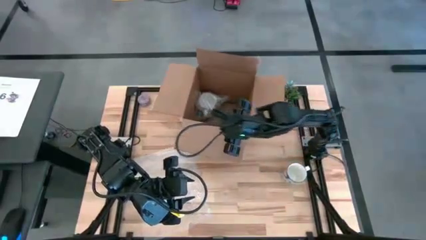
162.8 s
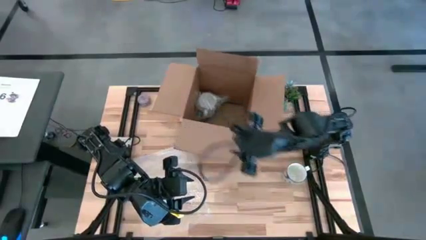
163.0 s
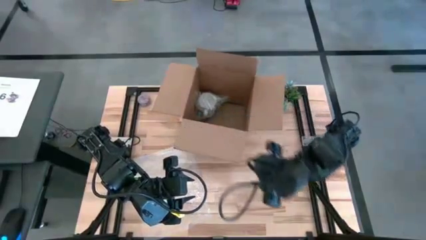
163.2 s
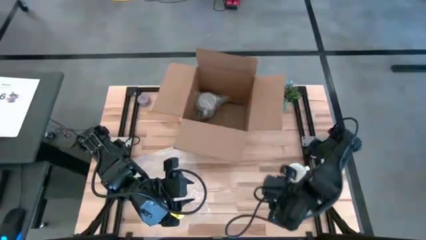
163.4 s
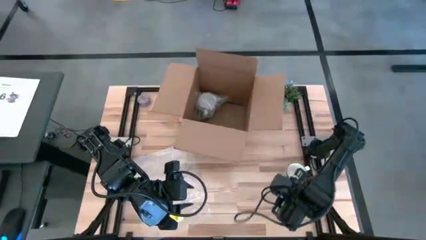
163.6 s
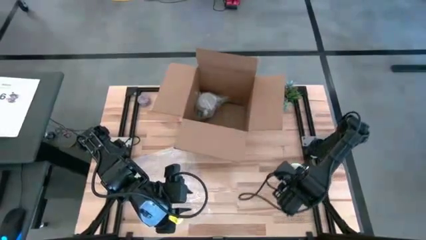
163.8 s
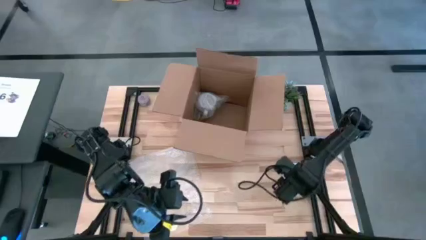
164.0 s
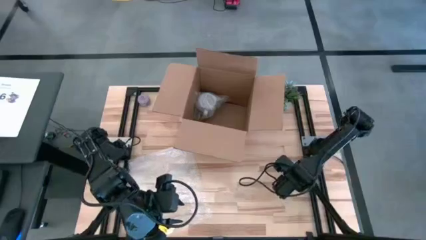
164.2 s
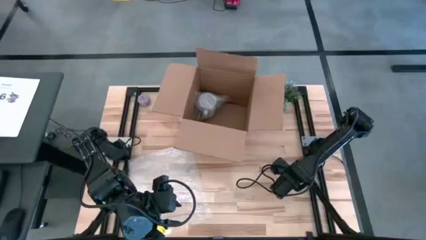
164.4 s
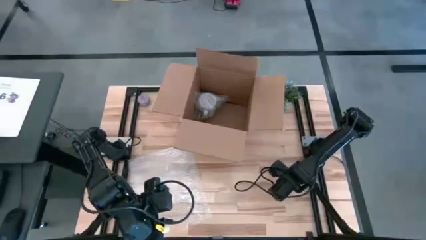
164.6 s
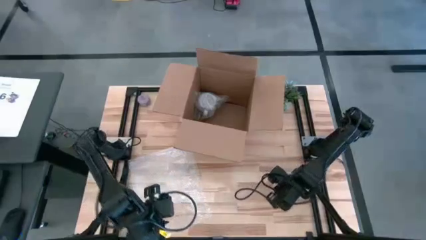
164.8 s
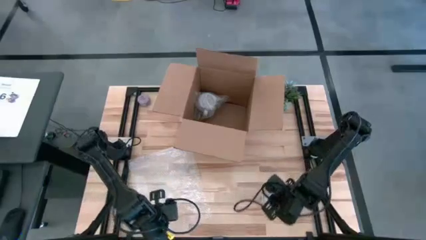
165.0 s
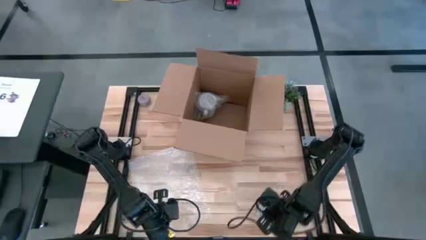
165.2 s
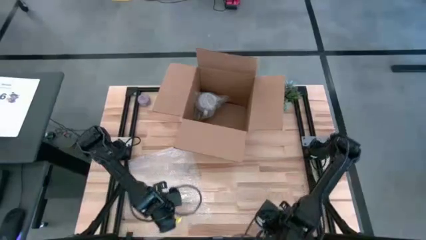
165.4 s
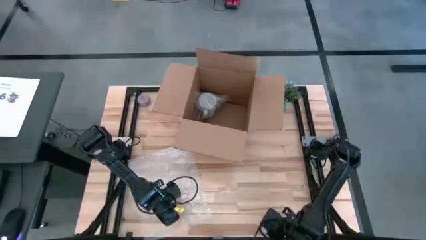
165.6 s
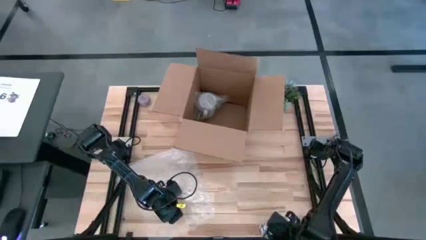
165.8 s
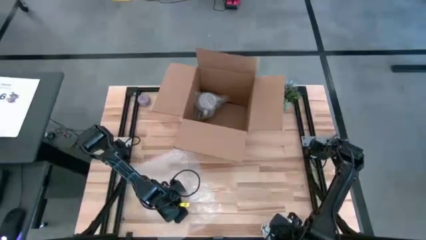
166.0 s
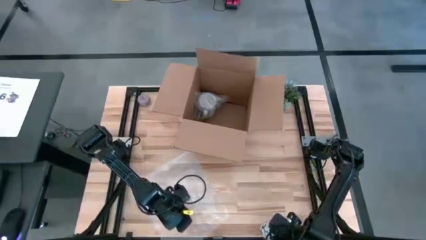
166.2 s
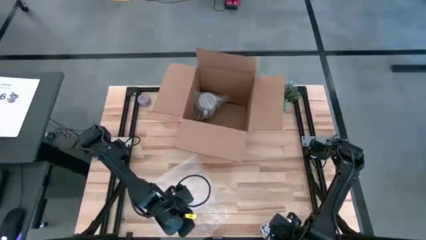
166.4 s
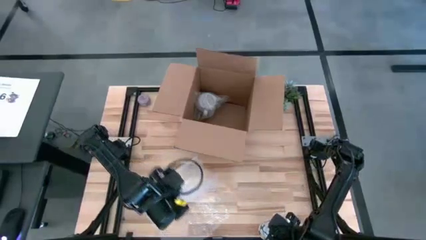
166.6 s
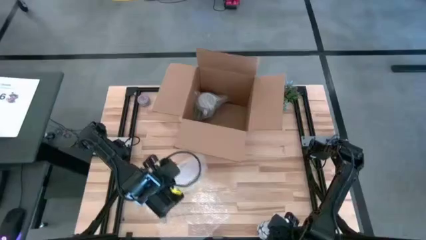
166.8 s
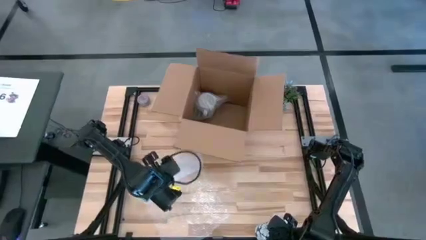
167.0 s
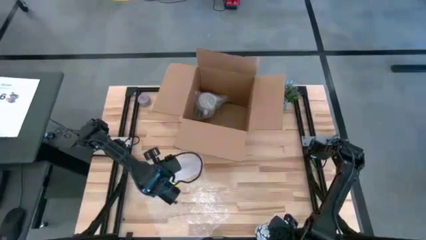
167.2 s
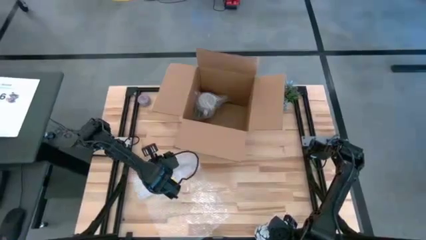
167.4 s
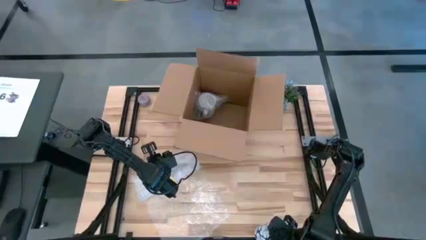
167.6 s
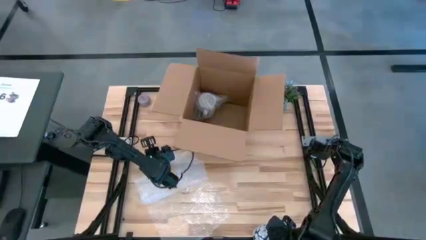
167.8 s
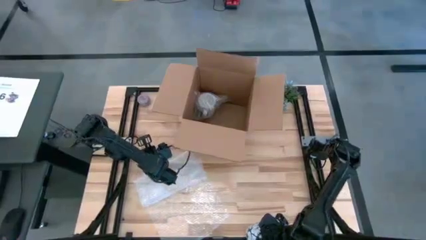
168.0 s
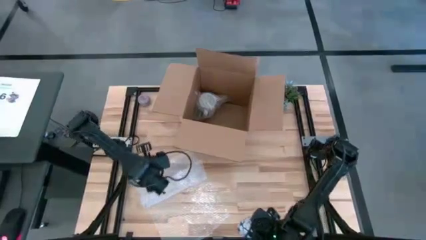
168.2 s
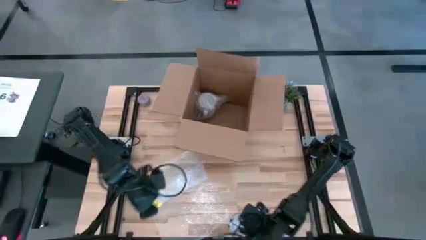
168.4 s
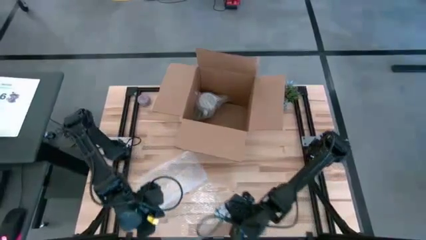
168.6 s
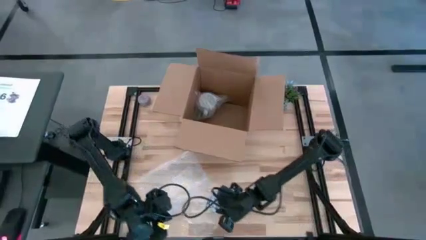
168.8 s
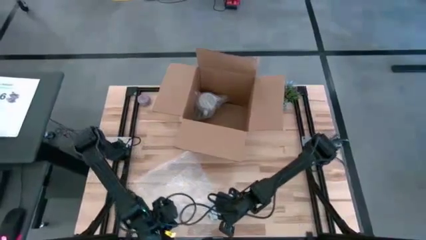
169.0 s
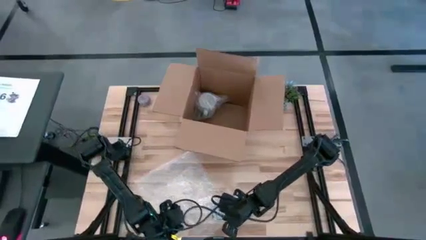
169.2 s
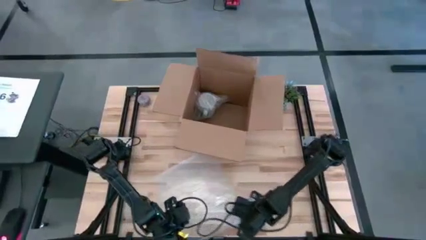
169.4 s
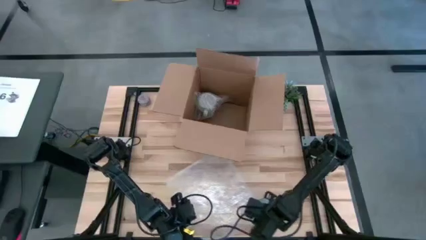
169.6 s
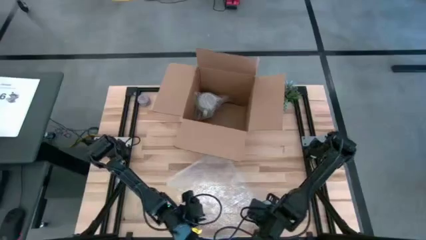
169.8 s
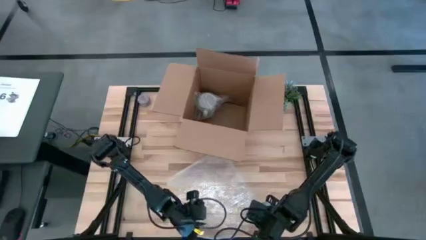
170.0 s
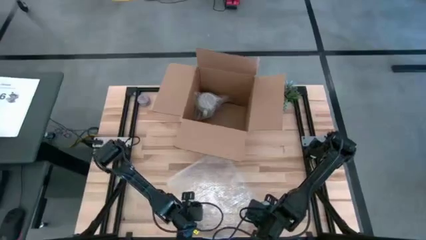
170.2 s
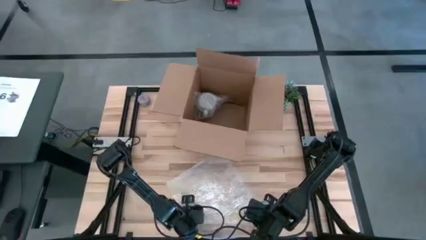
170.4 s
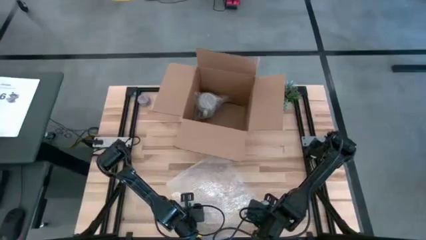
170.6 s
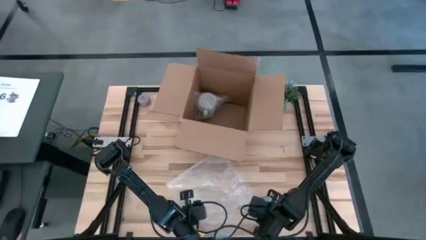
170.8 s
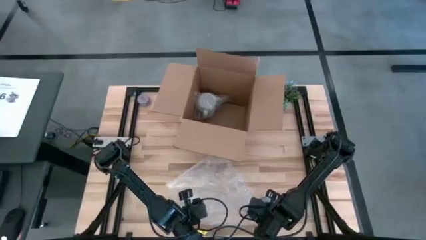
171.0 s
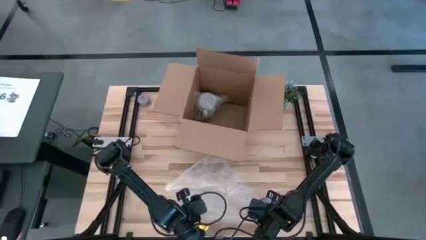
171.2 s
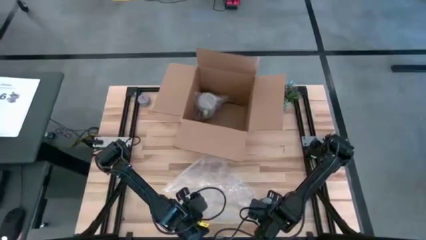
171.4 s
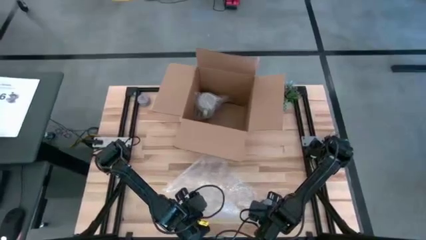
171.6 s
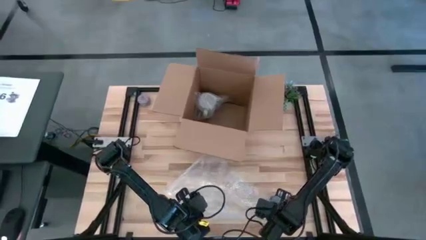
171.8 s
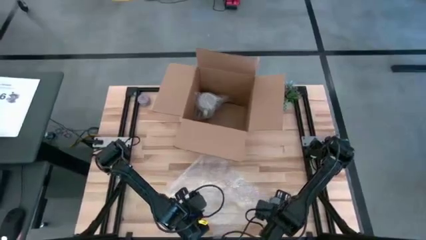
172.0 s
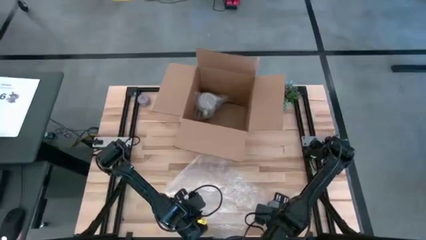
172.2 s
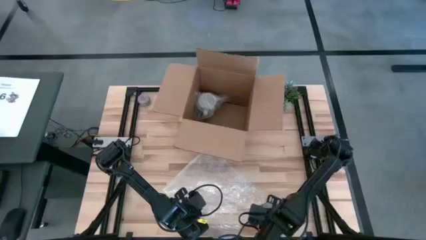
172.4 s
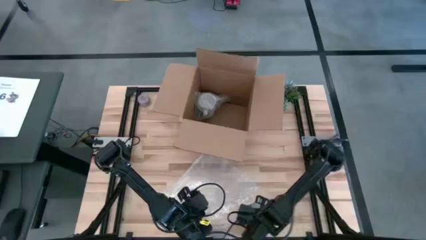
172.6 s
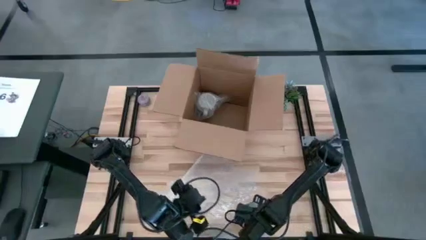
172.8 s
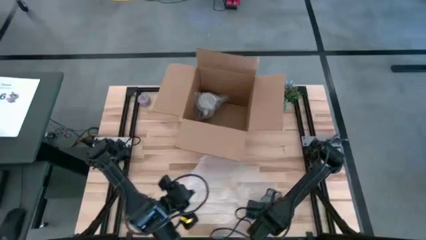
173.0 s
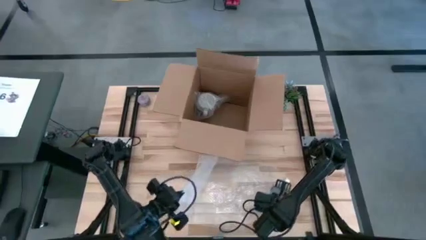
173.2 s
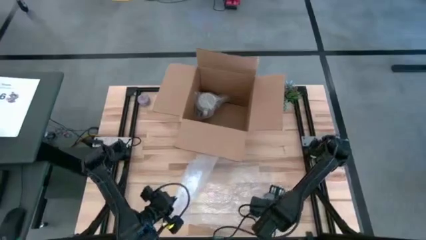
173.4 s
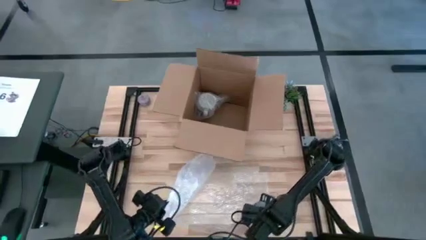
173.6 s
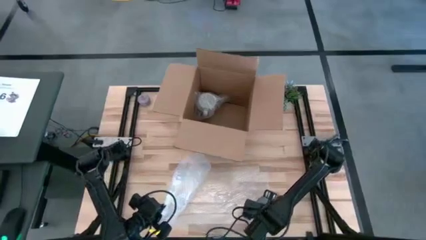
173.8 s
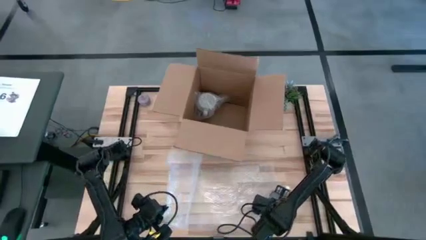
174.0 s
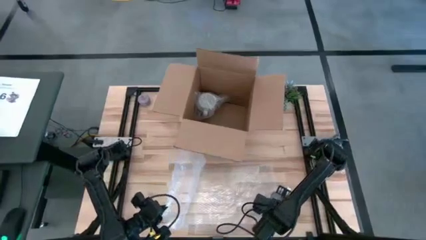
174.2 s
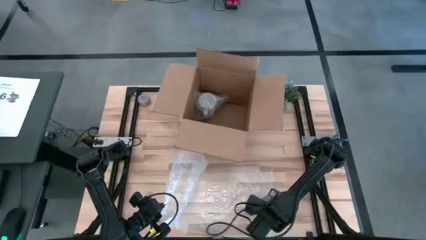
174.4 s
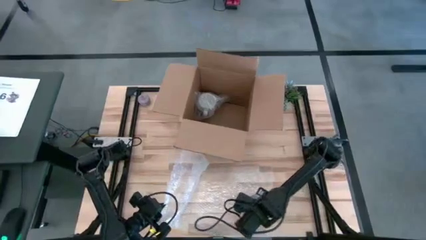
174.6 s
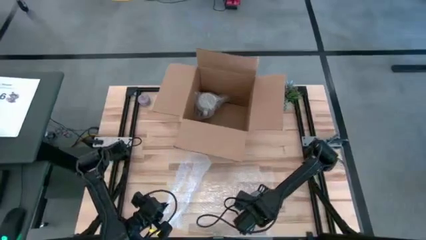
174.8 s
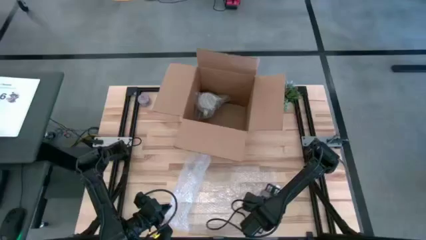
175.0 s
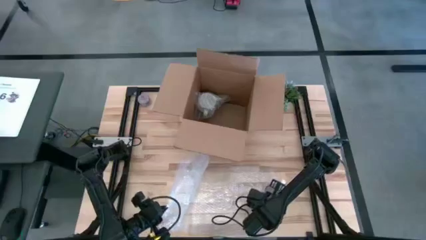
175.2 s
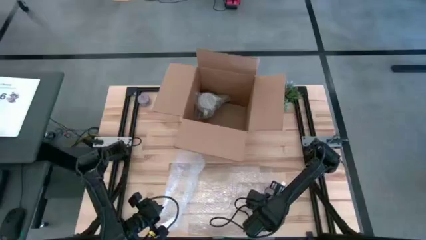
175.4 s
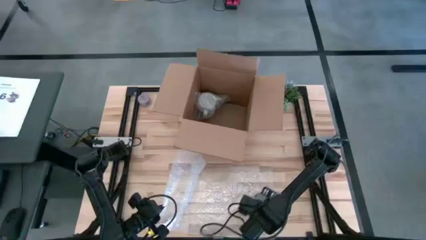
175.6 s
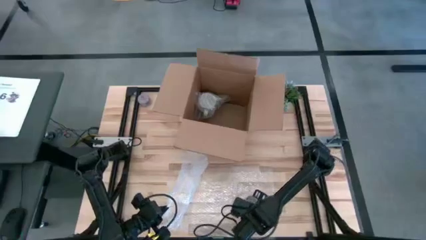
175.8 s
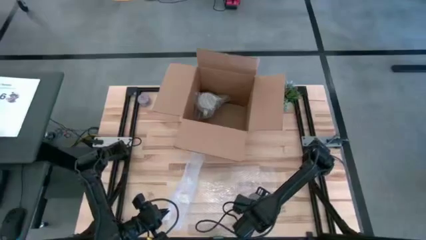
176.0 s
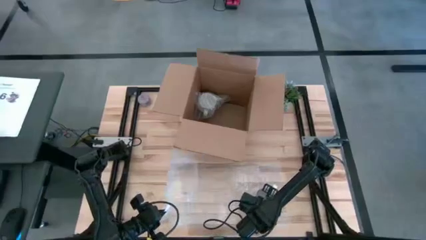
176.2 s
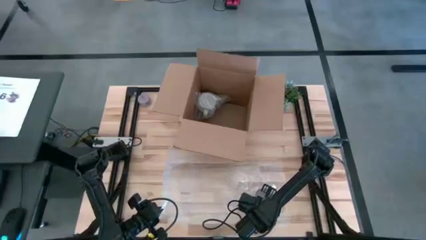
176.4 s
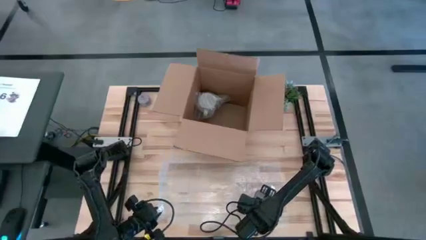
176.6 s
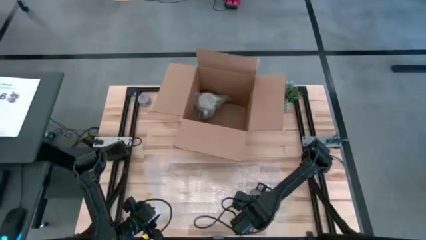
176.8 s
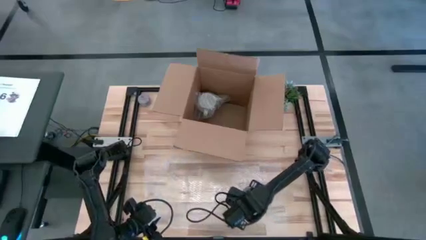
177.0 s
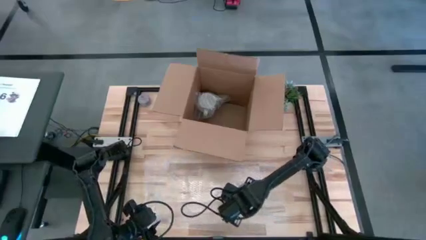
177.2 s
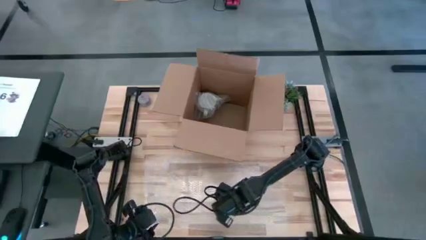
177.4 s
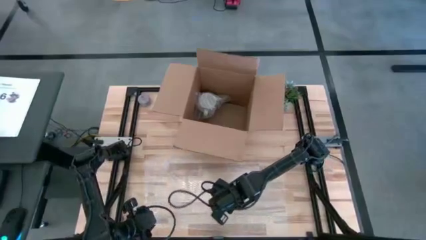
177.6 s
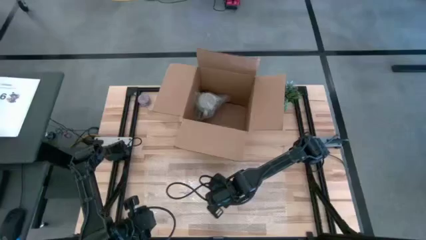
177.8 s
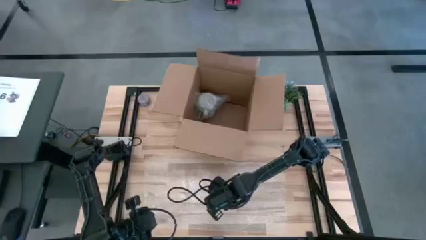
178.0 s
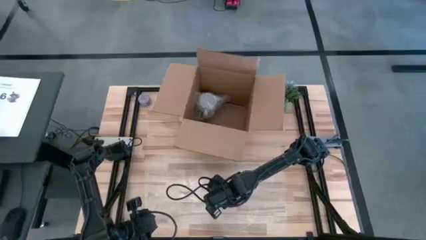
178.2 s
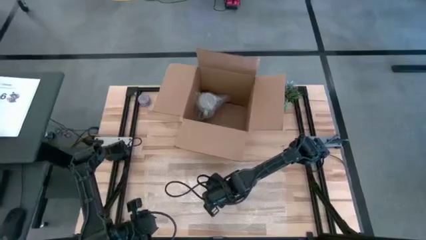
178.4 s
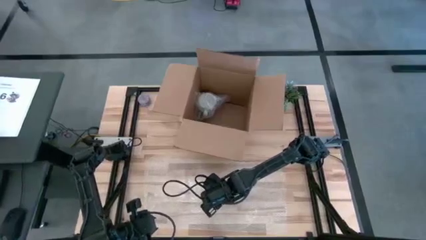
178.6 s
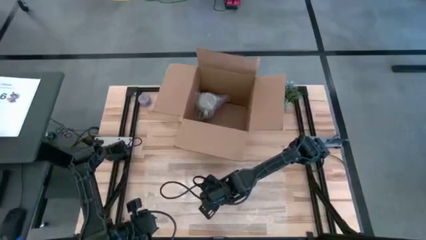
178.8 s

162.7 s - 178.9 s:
Task: wrap mug
Prepare the transparent bubble wrap

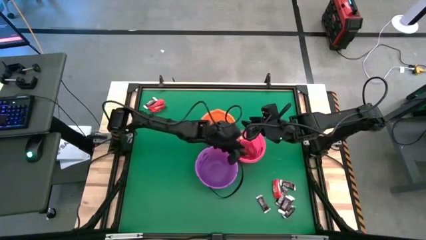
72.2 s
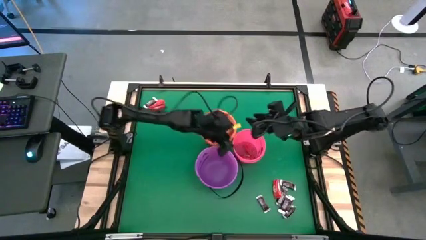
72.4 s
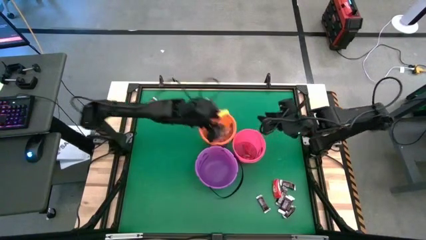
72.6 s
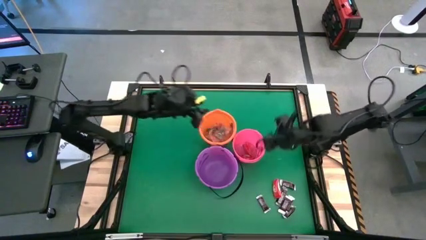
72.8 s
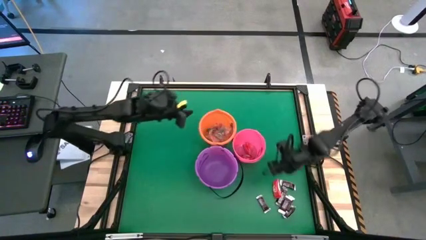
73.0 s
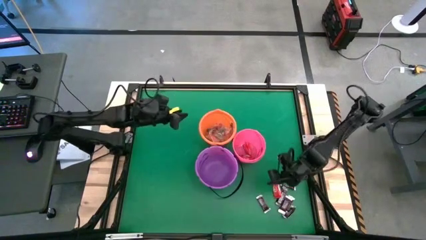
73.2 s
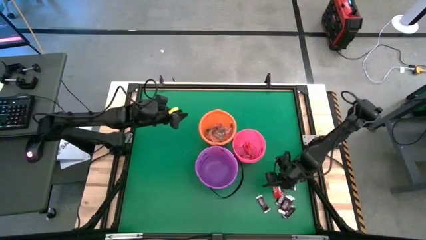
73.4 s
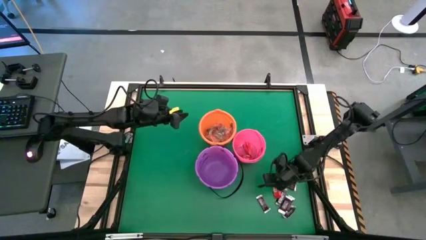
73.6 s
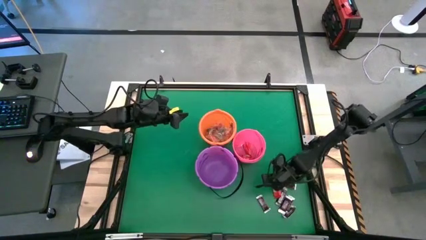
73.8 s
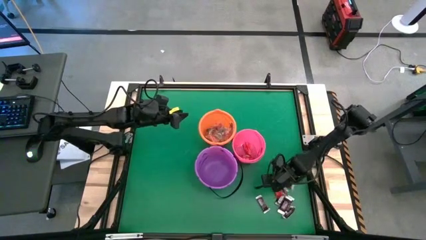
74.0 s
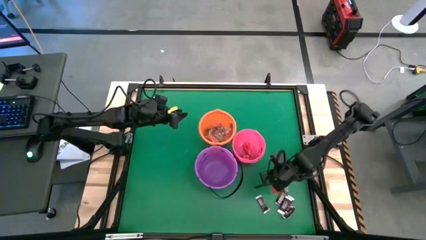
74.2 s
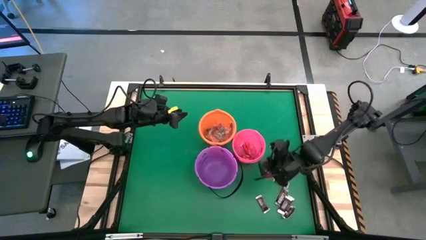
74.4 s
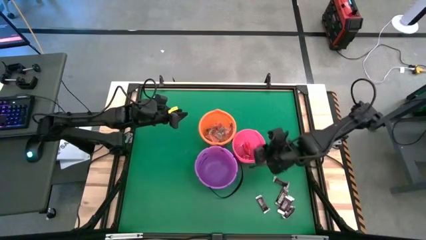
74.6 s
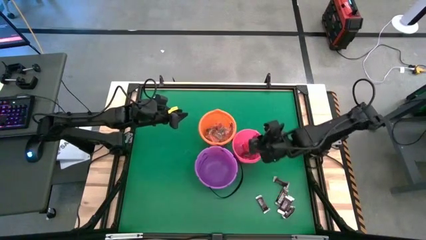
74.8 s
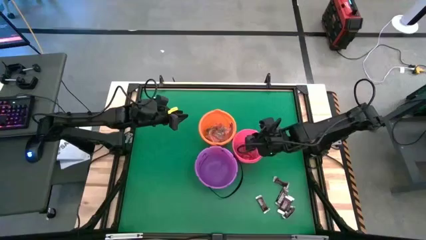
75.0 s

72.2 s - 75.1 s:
Task: Sort candy by brand, put in halloween buckets
Put the red chocolate bar into the pink bucket
